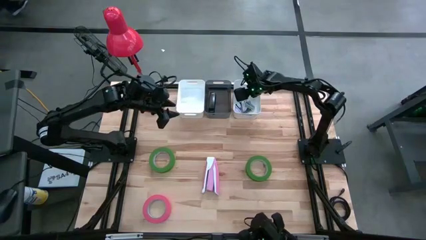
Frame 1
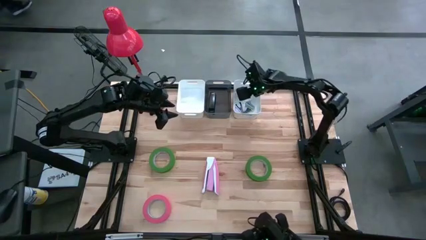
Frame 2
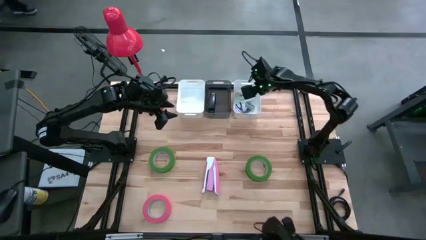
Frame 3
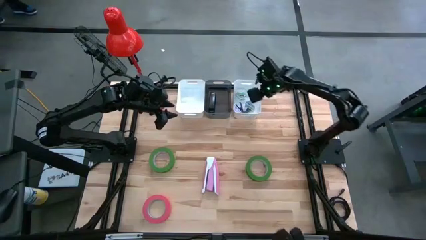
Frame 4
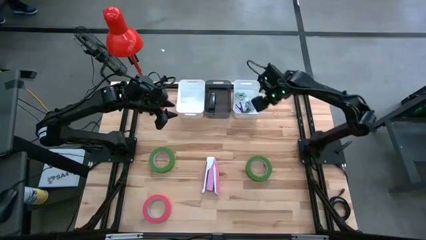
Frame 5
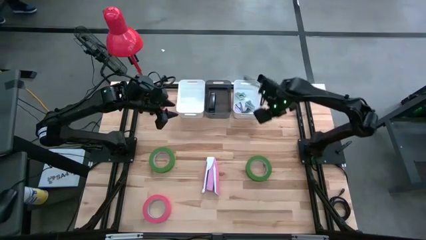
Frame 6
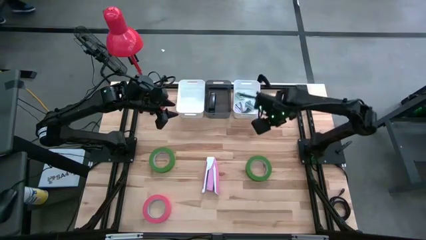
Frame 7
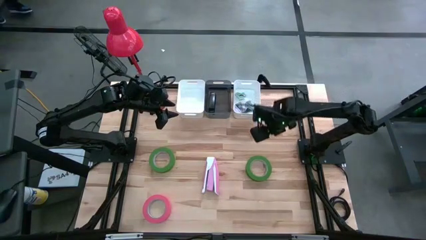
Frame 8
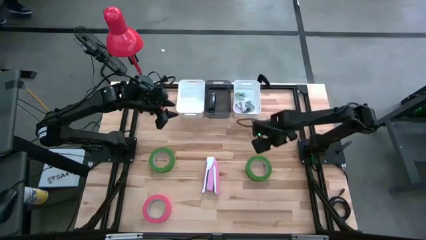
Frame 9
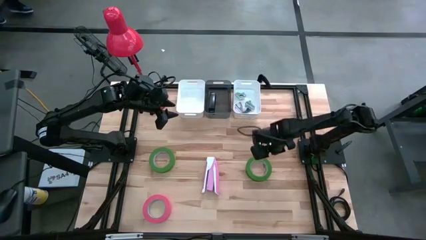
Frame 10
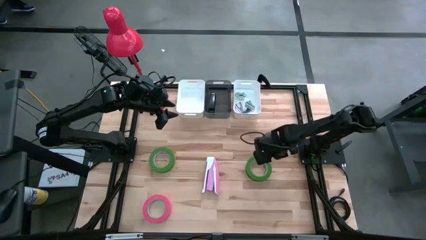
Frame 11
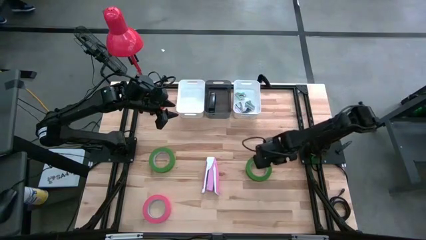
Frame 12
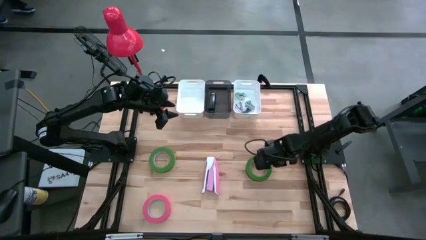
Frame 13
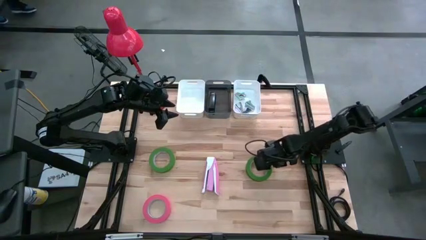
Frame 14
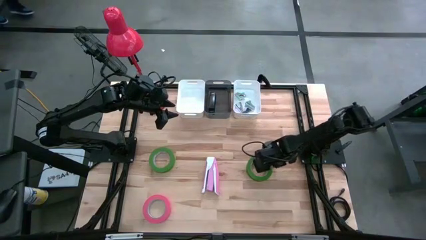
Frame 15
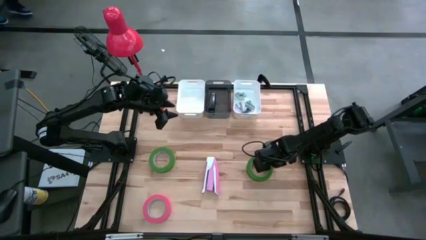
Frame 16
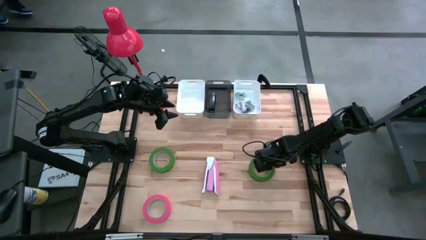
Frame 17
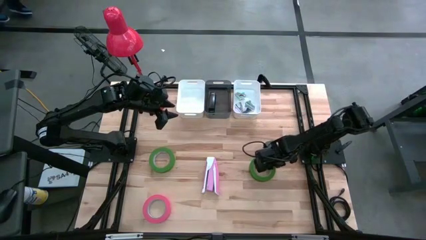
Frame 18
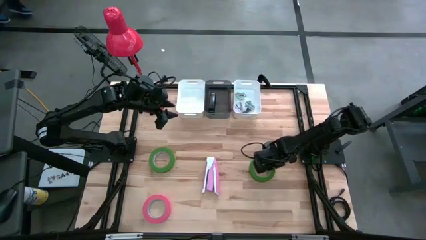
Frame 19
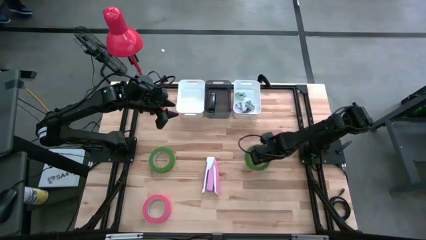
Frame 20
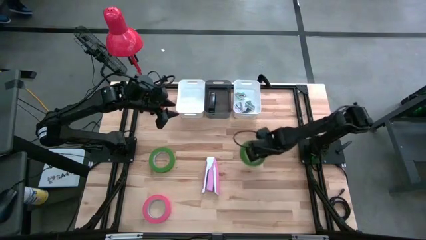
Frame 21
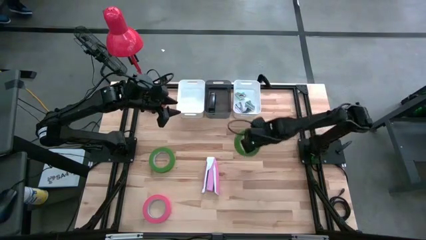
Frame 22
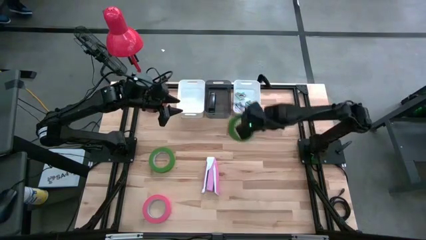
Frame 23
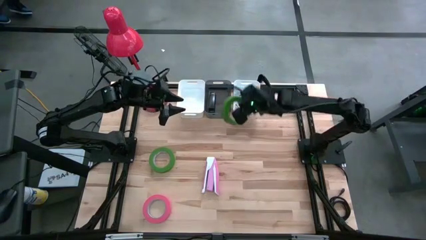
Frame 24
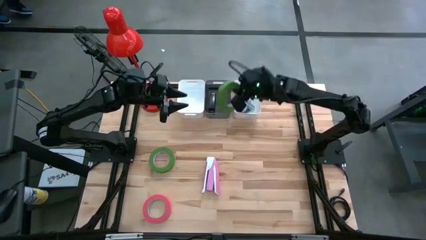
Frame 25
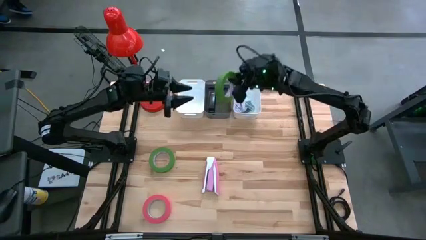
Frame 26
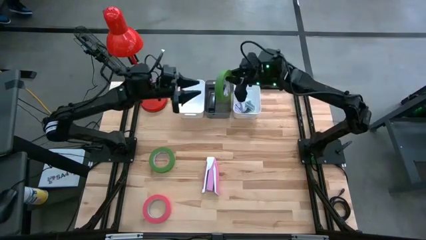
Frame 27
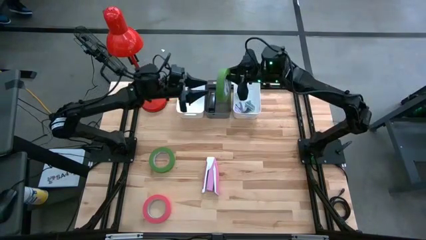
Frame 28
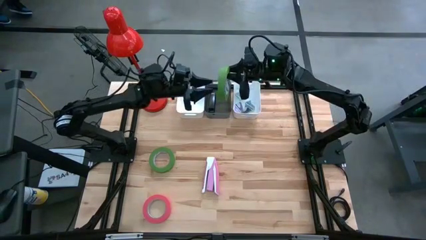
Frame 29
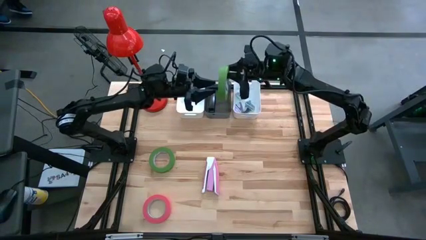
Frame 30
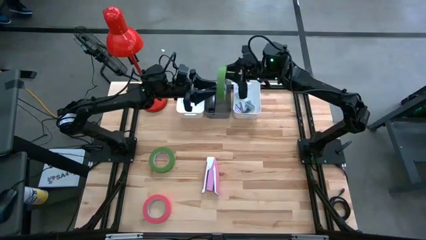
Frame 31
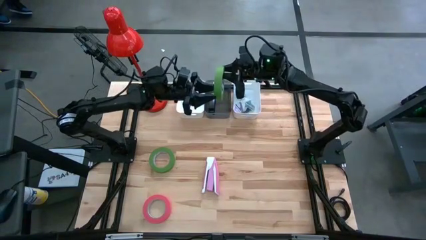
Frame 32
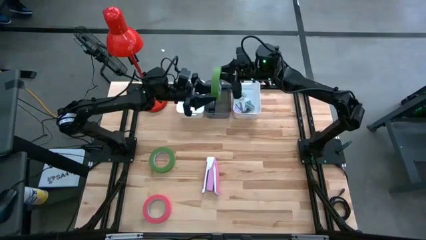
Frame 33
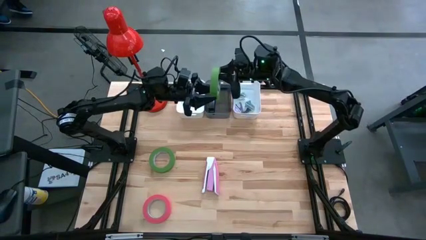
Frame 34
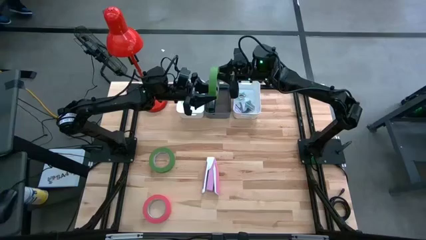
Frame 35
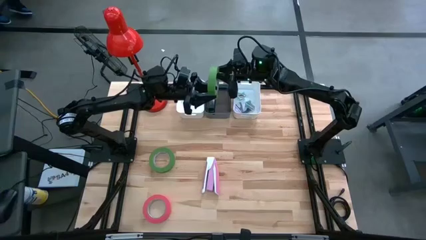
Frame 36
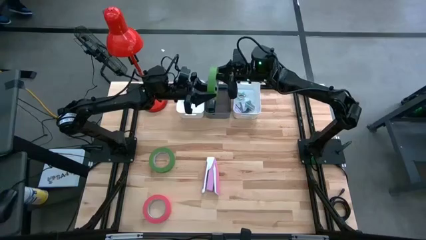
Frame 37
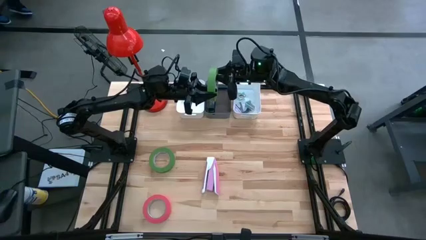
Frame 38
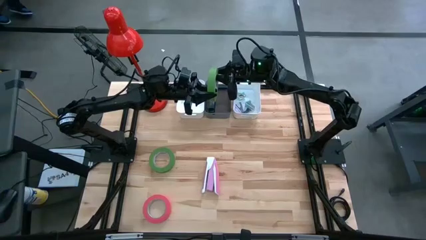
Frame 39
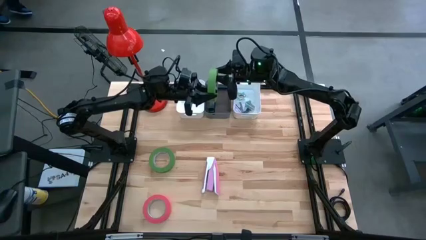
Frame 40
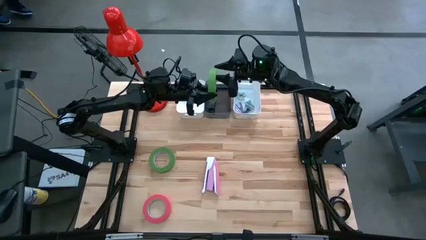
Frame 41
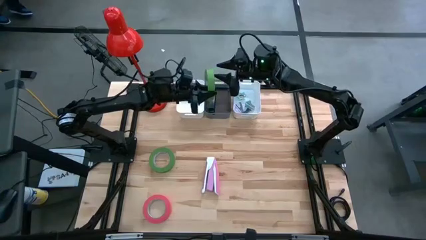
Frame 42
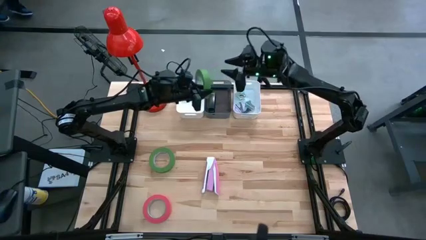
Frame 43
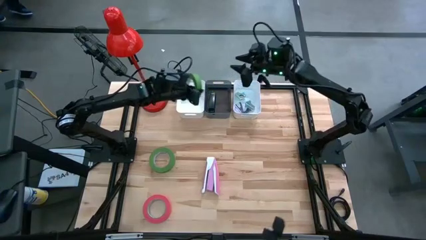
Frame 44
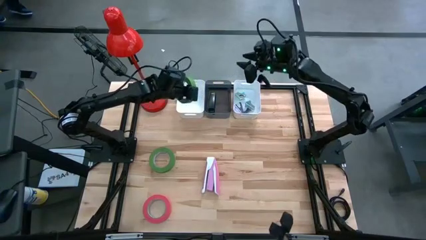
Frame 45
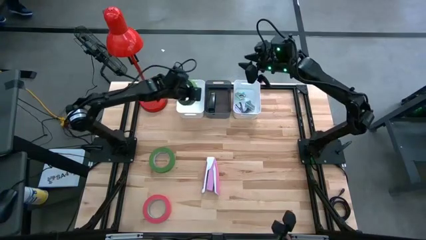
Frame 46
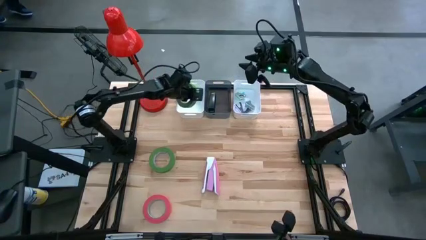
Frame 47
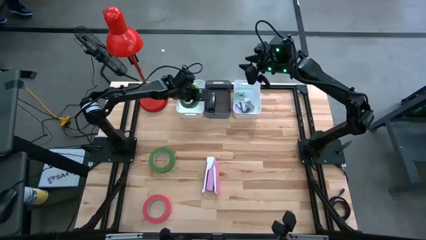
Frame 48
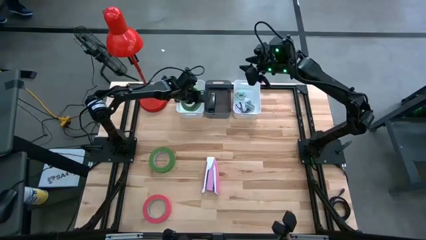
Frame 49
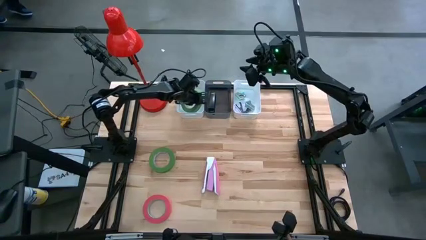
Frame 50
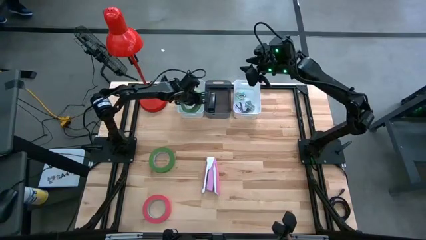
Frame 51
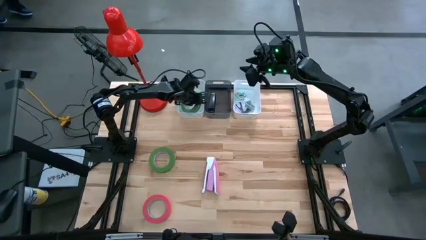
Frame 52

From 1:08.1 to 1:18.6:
Task: Pick and place Stapler, Stapler remover, tape
Put the right green tape into the left white bin
